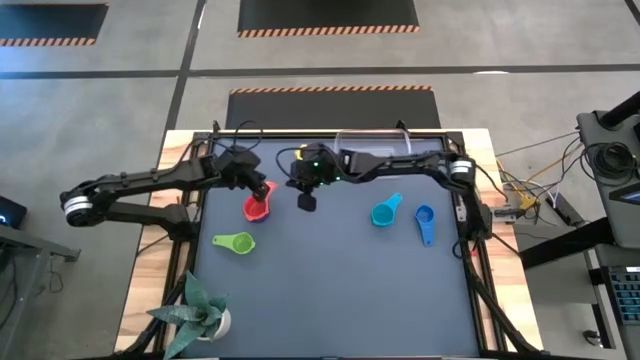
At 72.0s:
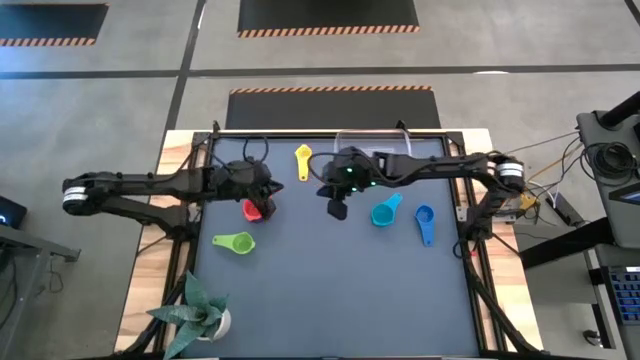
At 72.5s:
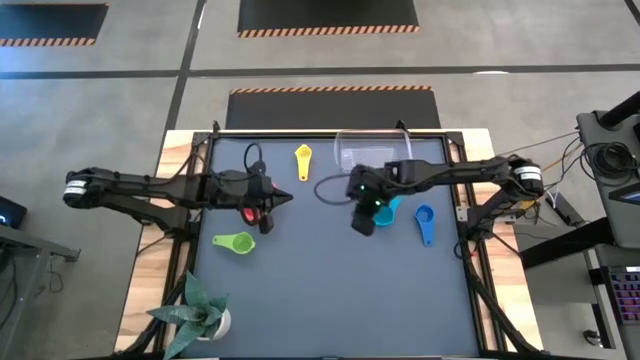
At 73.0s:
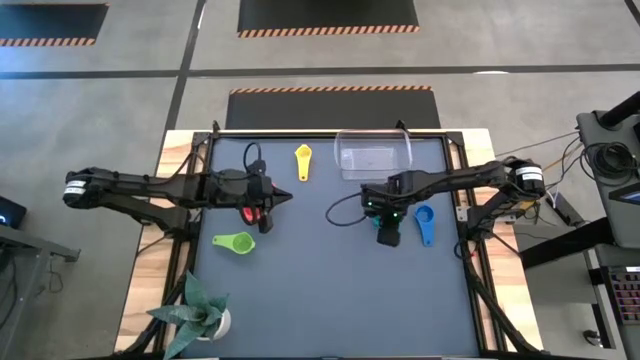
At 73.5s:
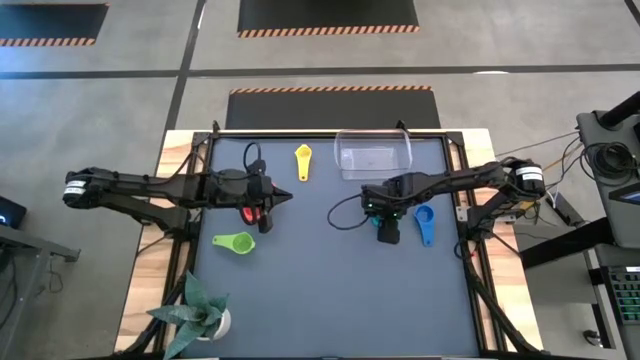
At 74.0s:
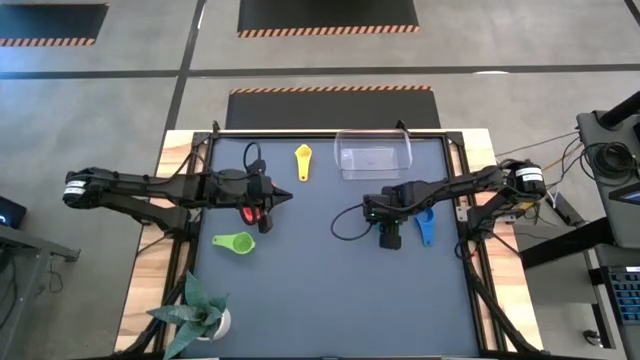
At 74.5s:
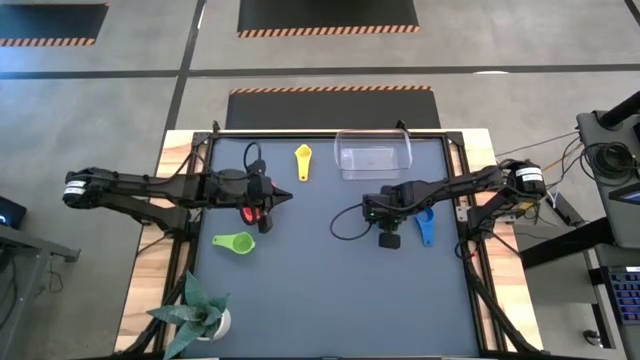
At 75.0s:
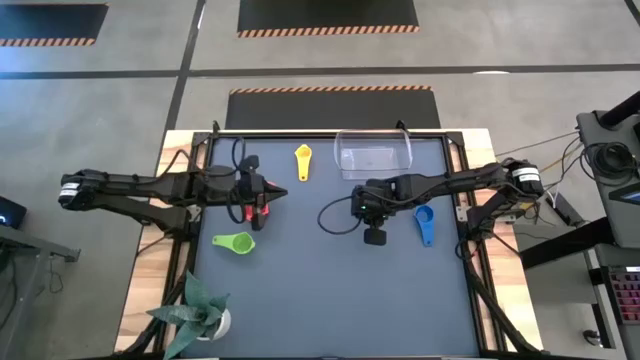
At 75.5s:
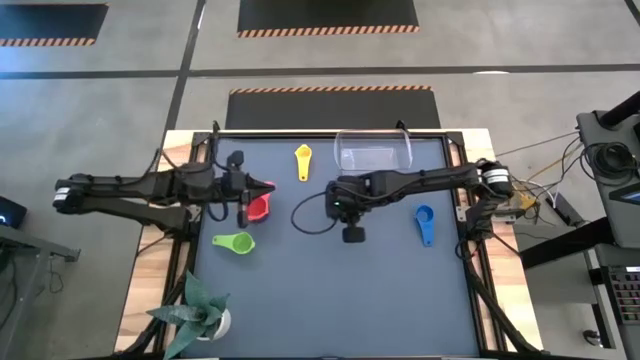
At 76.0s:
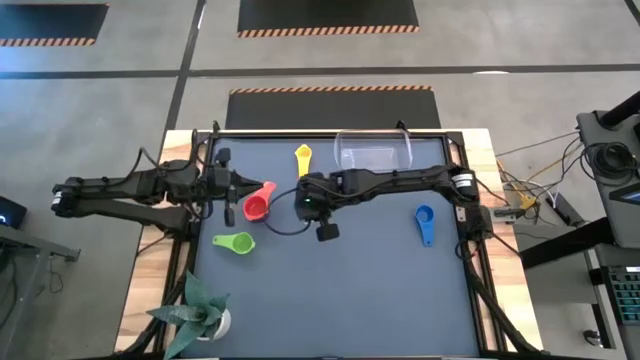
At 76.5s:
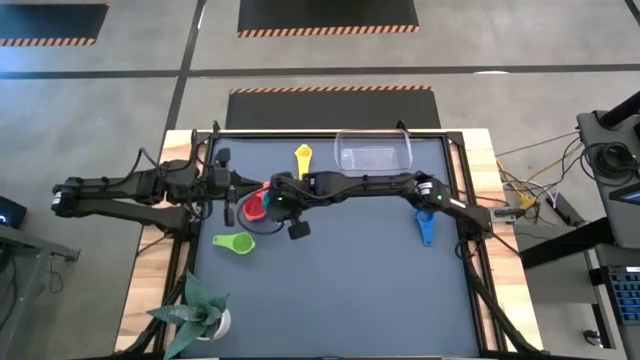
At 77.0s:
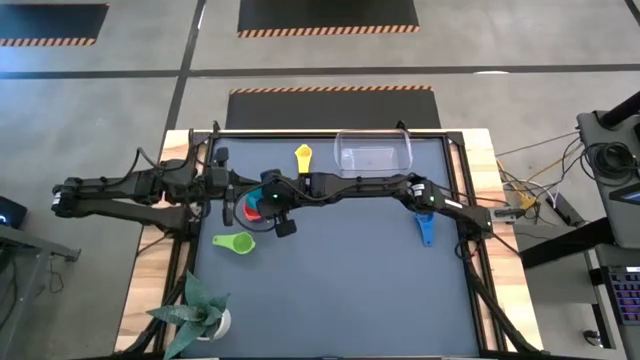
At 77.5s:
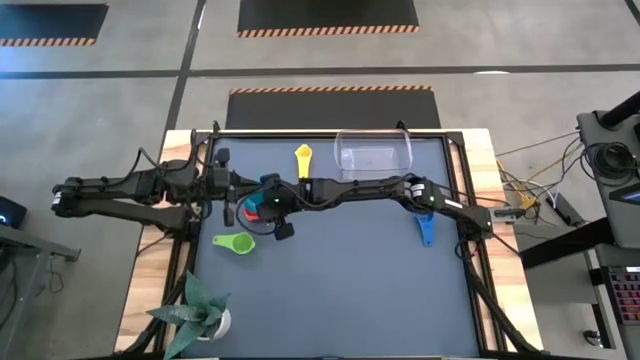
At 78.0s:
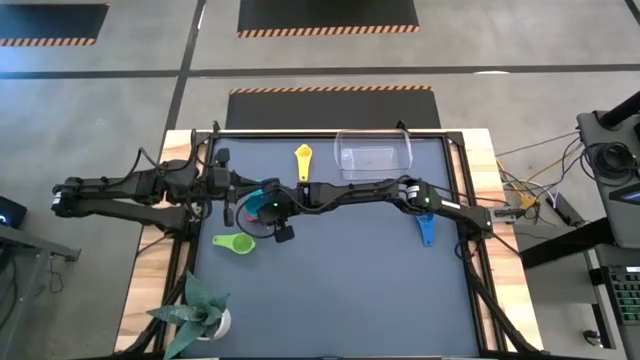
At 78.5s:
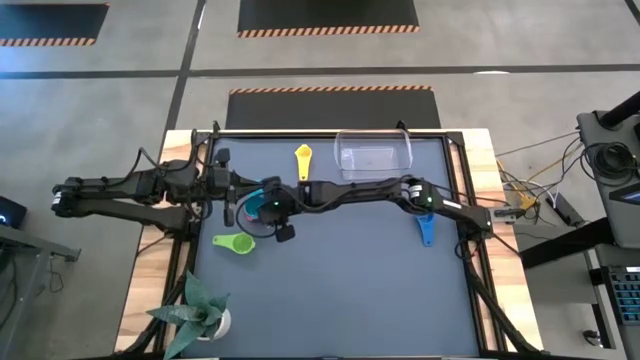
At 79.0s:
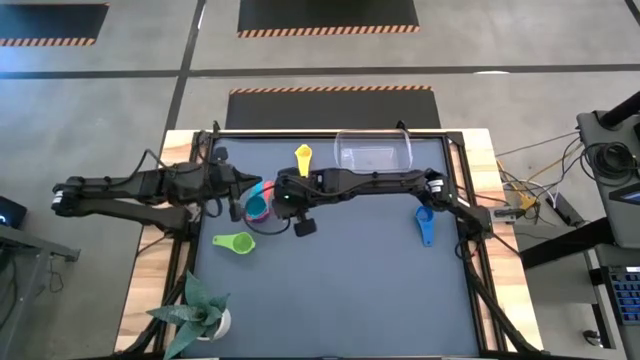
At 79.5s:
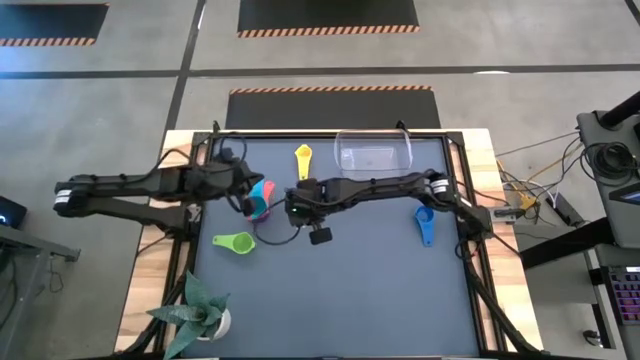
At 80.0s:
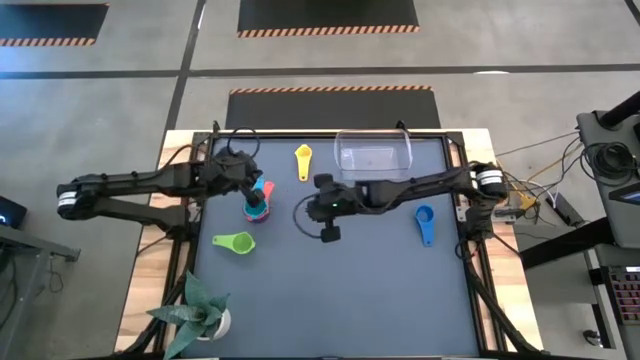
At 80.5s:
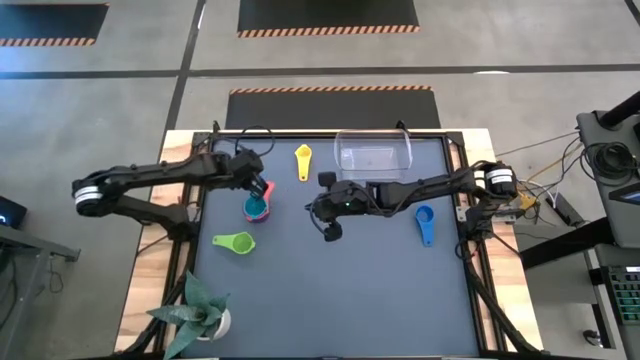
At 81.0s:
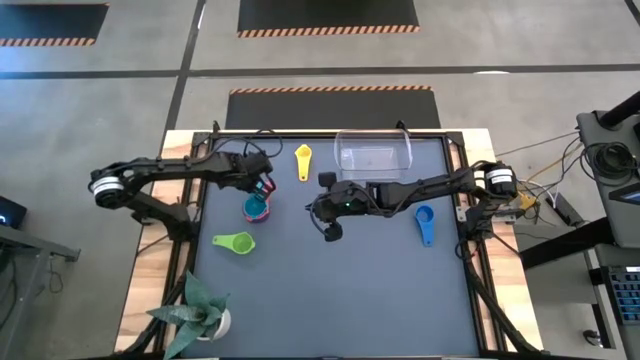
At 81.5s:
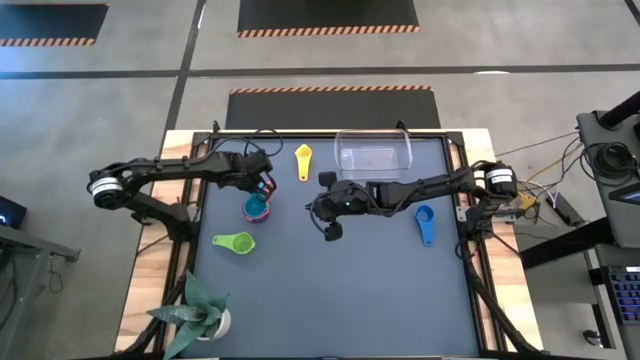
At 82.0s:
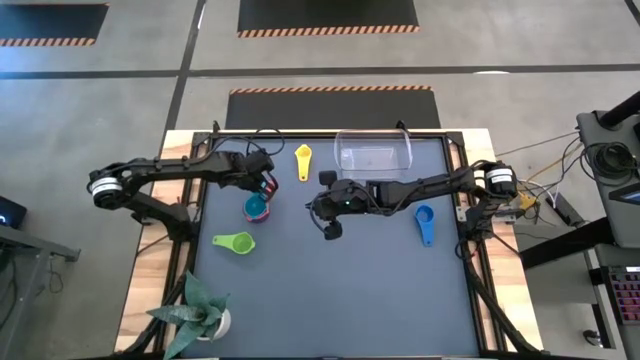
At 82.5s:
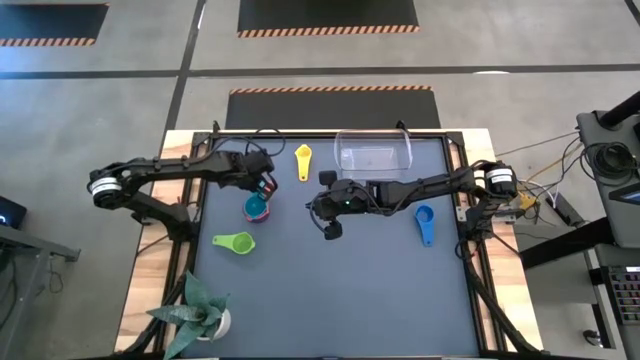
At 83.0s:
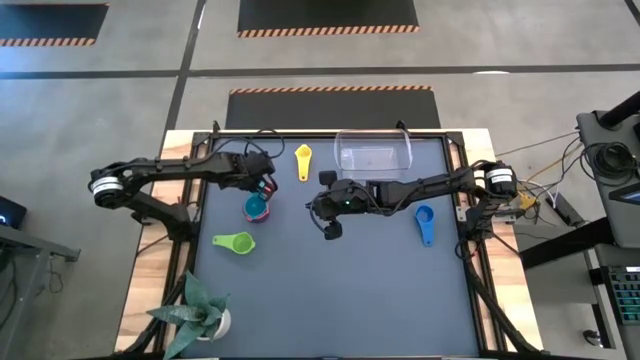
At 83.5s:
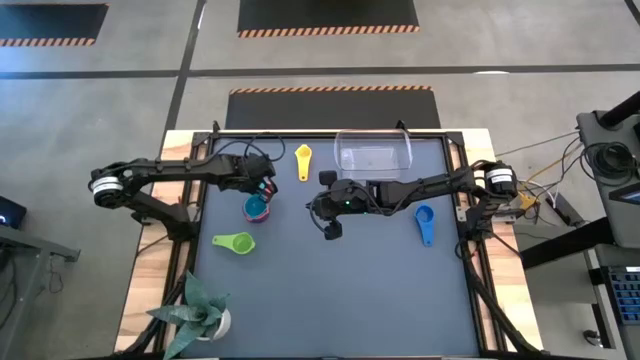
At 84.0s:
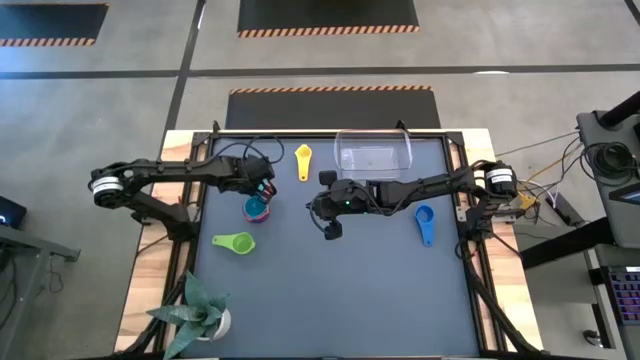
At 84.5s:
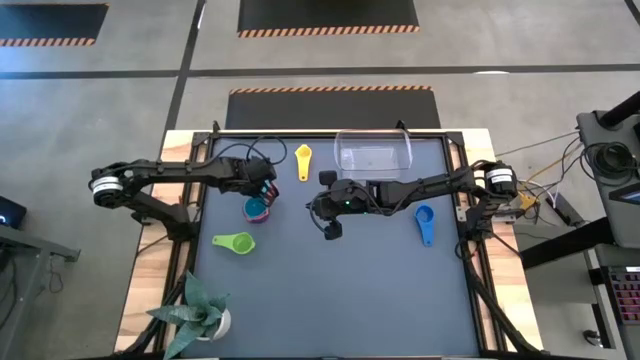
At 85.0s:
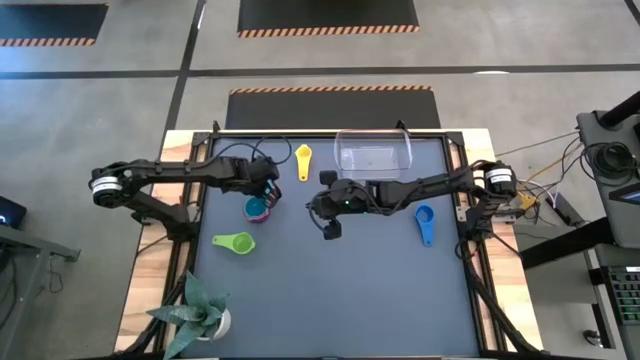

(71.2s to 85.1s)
Task: Nest measuring cups in basket
Stack the light blue measuring cup on top of the red measuring cup

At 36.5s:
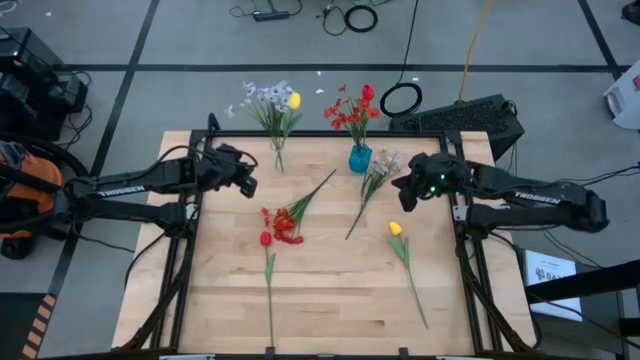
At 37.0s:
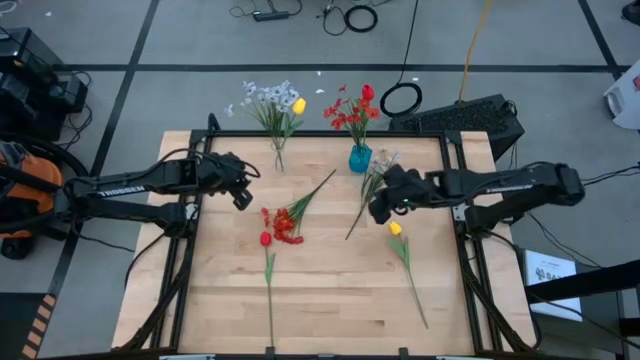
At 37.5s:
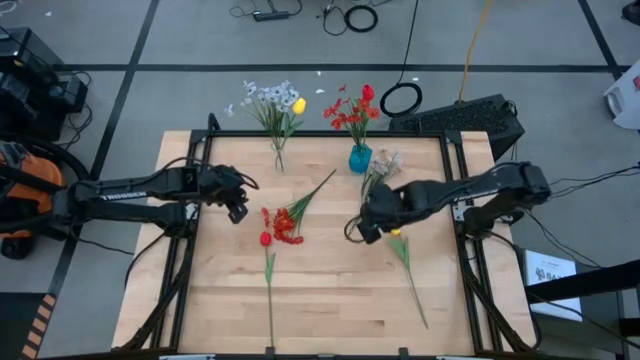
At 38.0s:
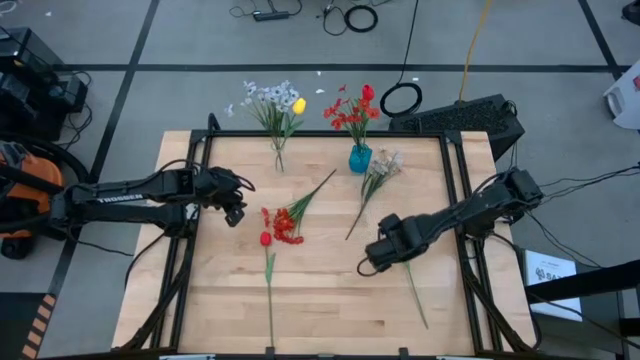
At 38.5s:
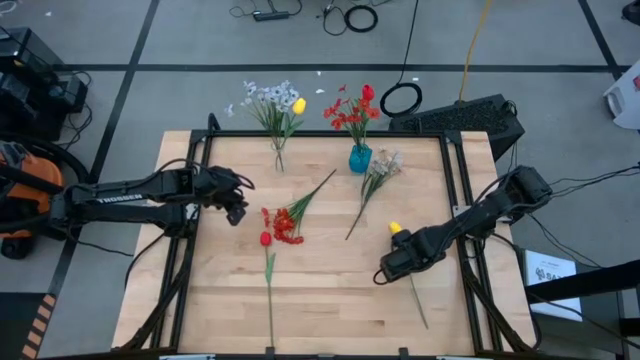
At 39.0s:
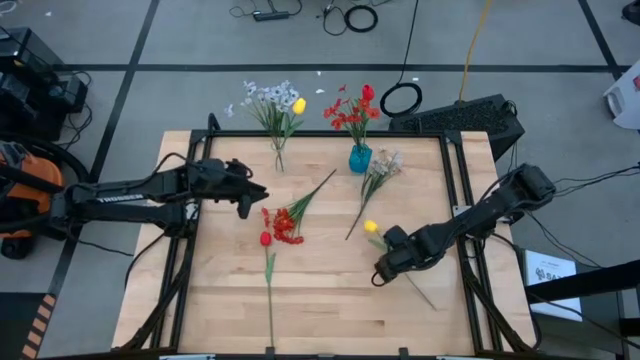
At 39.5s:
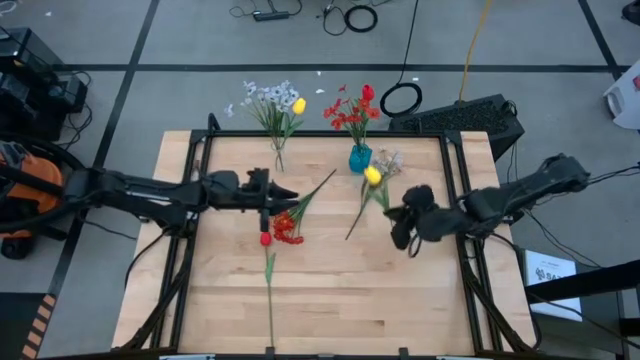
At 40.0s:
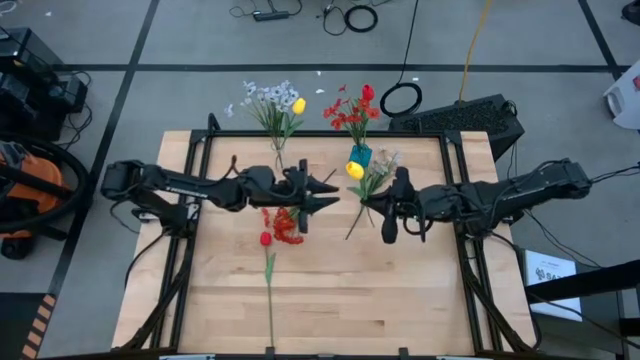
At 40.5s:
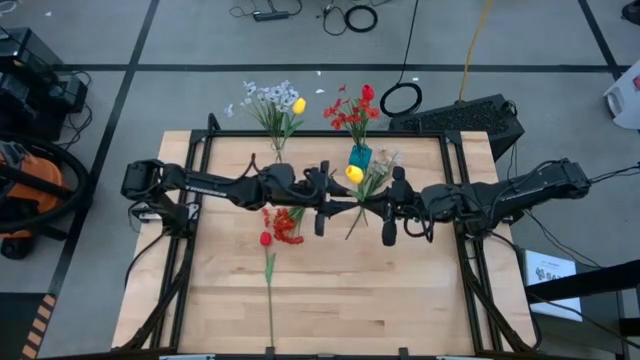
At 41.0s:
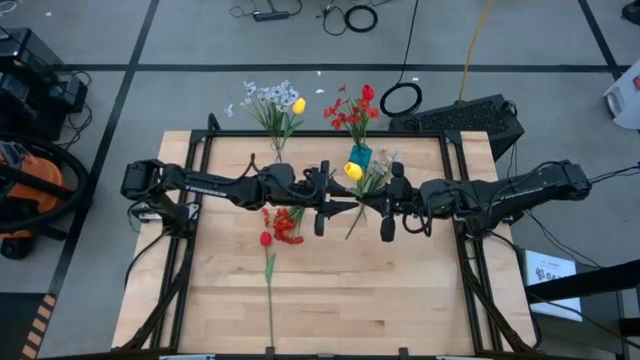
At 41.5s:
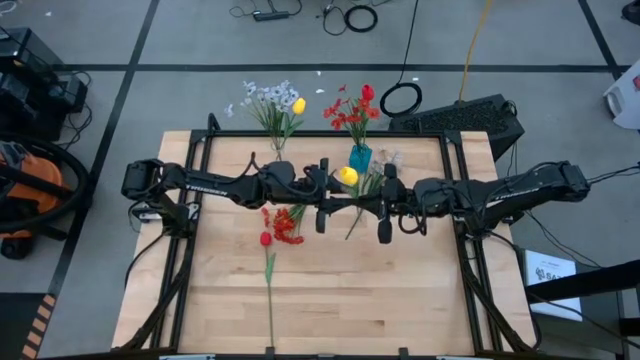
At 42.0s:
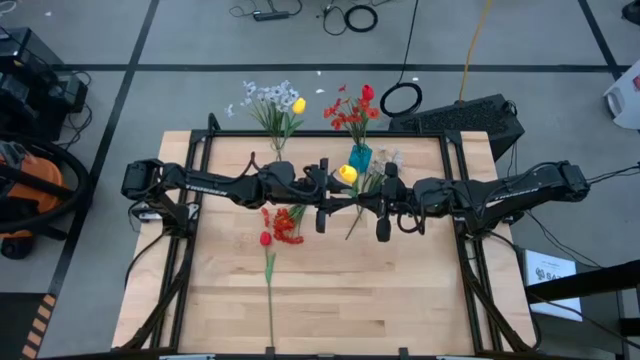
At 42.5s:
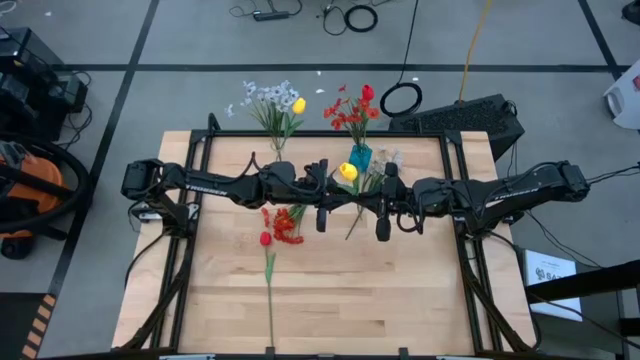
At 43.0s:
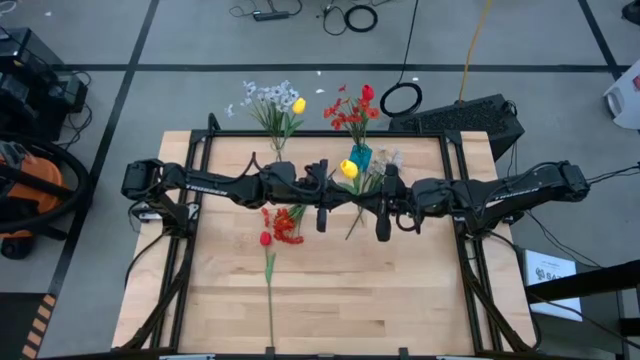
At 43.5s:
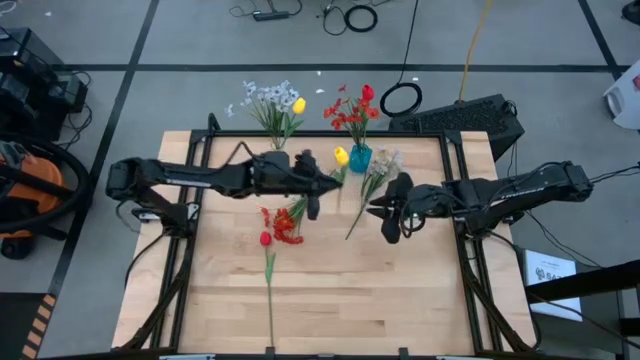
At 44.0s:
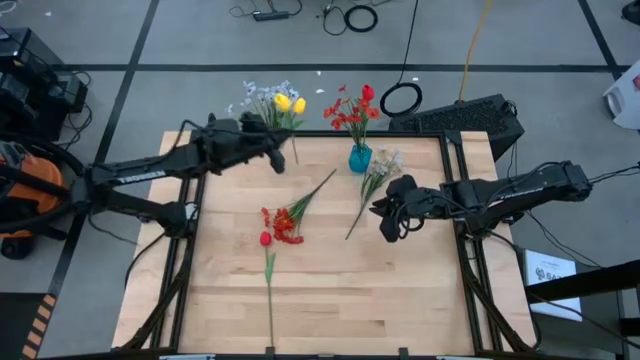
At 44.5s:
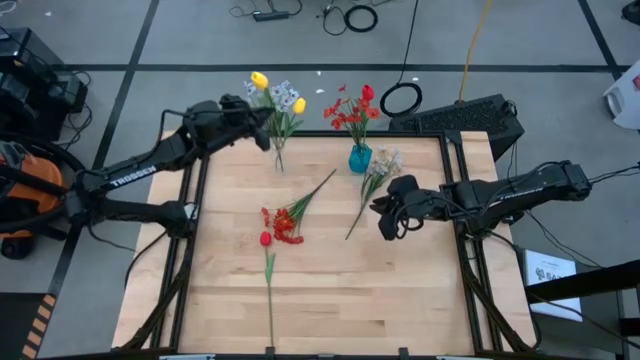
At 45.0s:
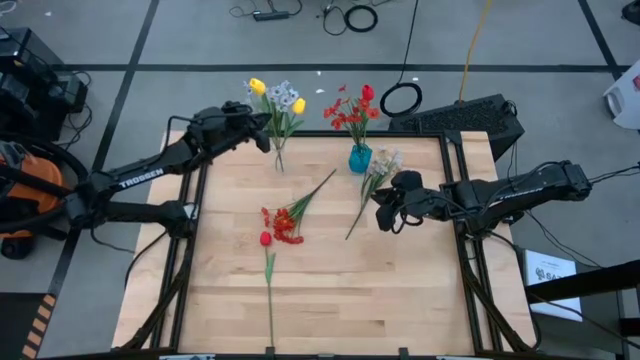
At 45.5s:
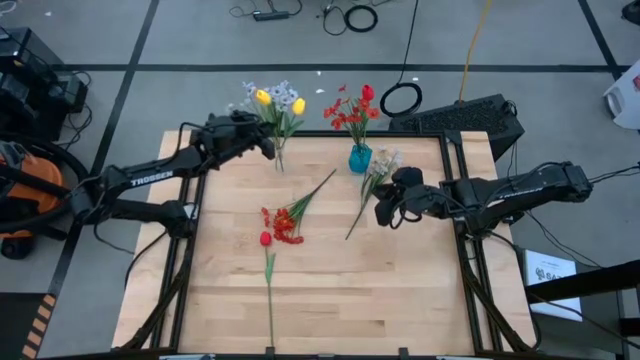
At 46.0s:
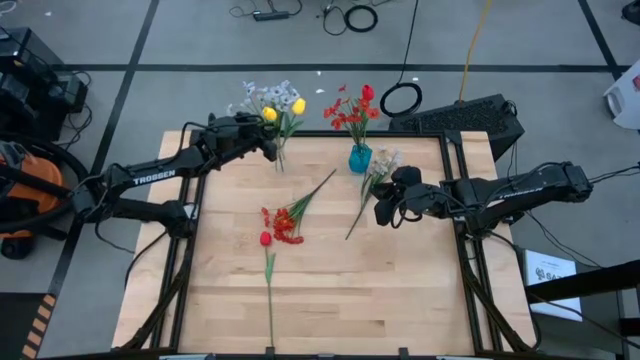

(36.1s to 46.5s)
Task: Sort flowers into vase by color
Put the yellow flower into the transparent vase
